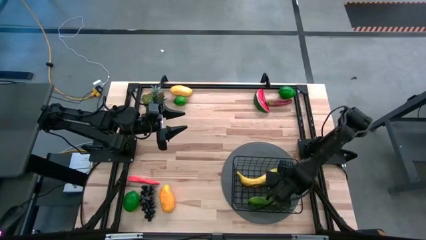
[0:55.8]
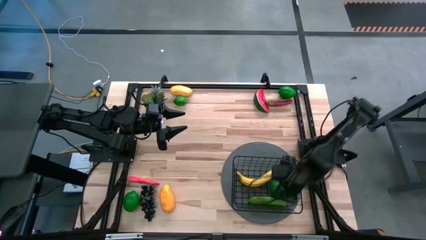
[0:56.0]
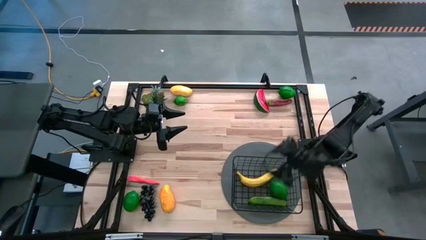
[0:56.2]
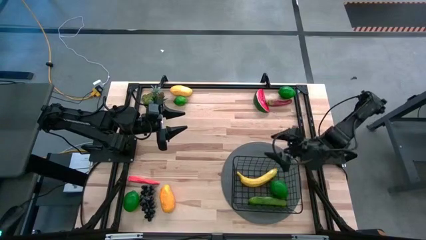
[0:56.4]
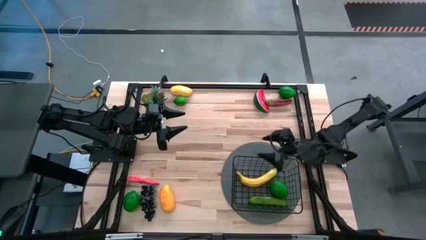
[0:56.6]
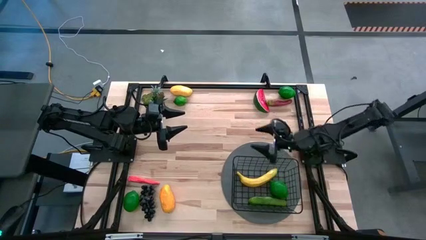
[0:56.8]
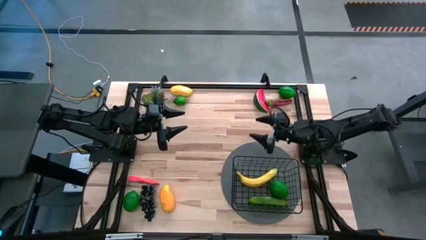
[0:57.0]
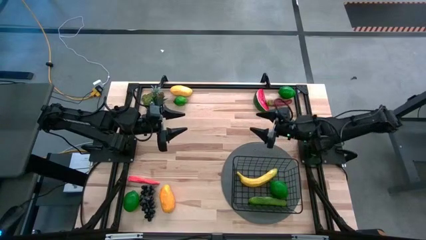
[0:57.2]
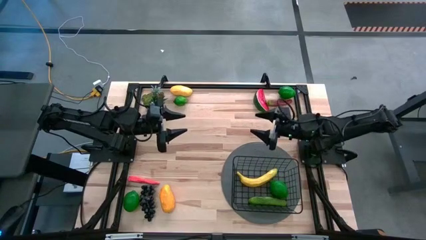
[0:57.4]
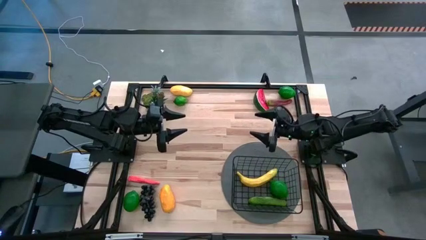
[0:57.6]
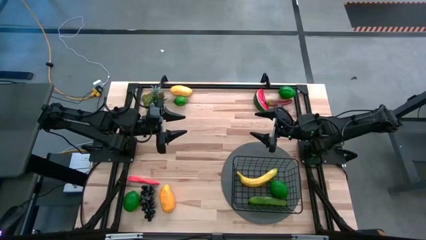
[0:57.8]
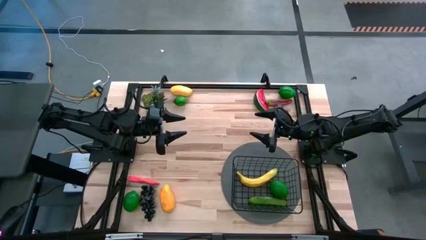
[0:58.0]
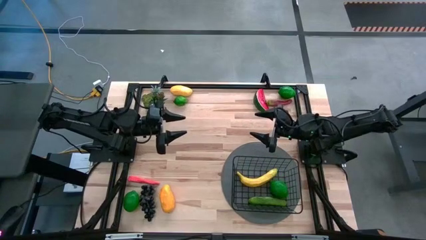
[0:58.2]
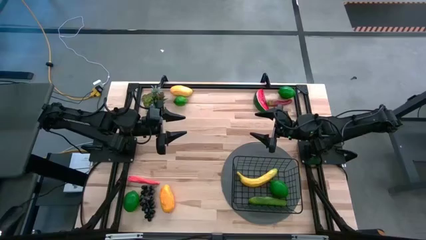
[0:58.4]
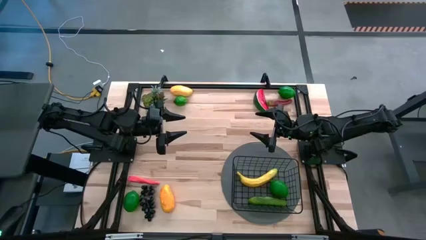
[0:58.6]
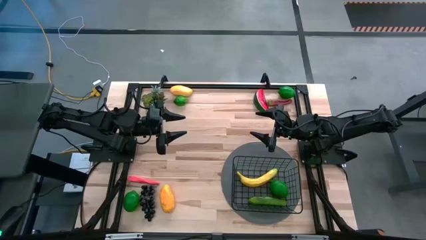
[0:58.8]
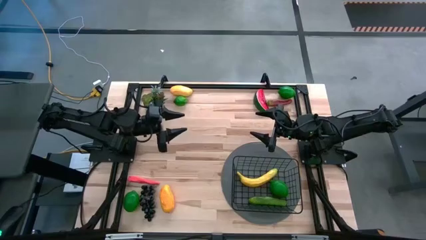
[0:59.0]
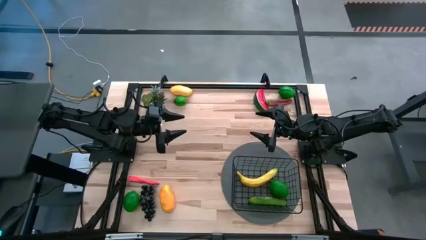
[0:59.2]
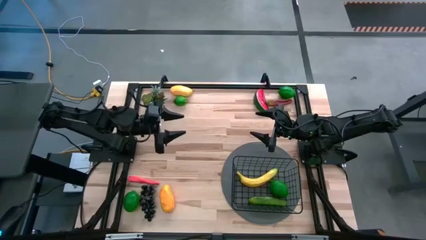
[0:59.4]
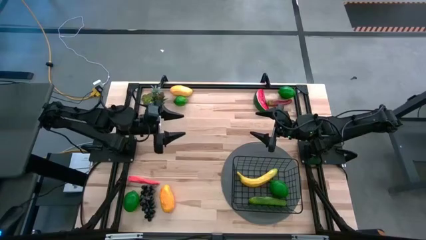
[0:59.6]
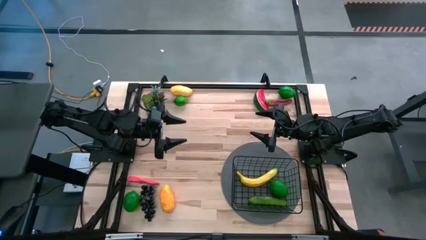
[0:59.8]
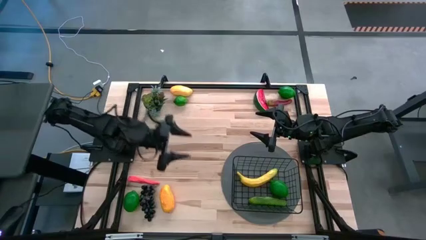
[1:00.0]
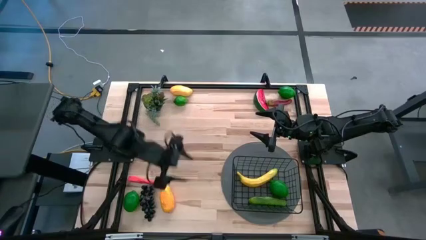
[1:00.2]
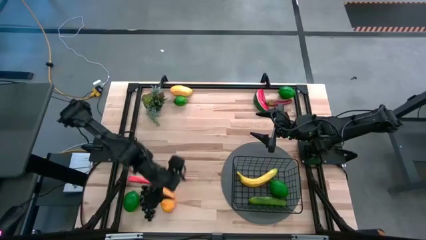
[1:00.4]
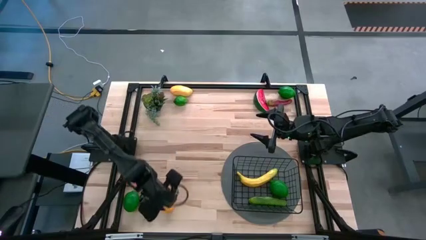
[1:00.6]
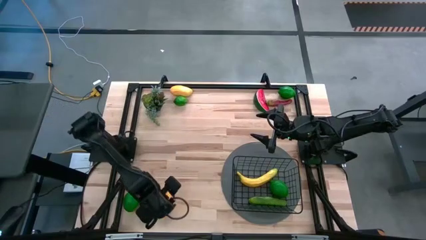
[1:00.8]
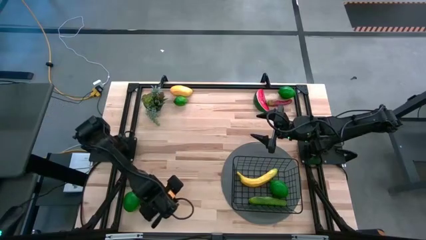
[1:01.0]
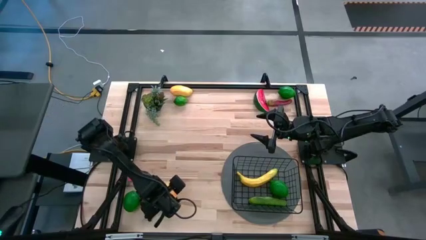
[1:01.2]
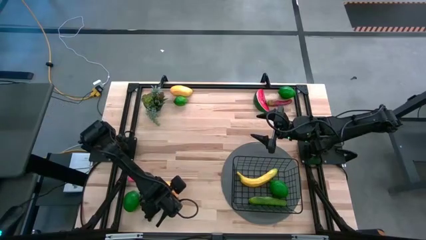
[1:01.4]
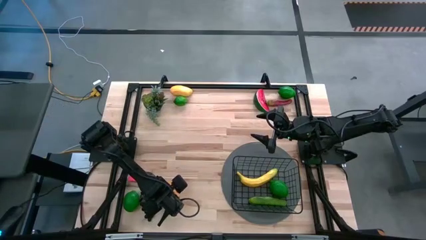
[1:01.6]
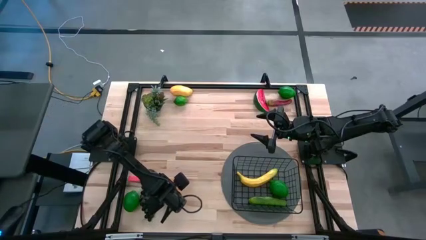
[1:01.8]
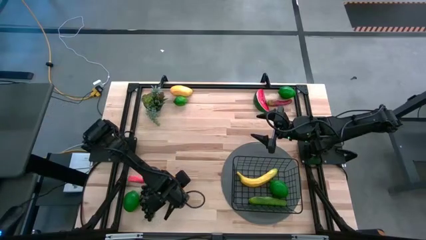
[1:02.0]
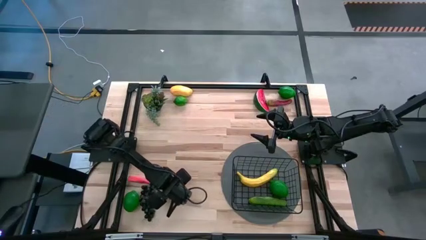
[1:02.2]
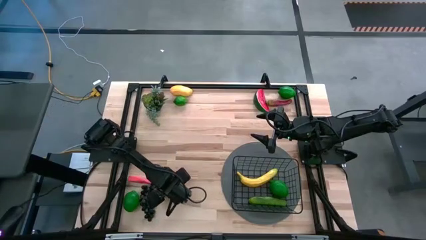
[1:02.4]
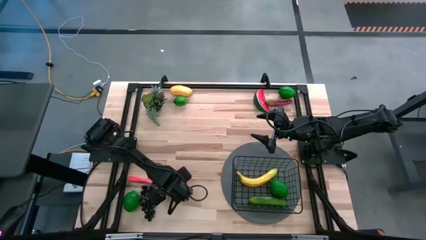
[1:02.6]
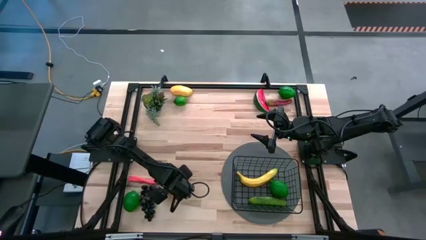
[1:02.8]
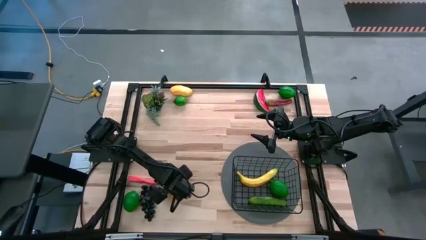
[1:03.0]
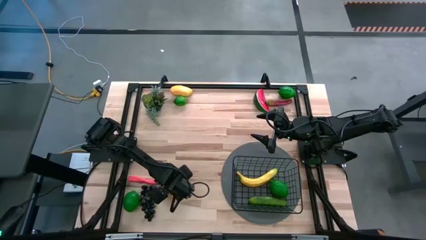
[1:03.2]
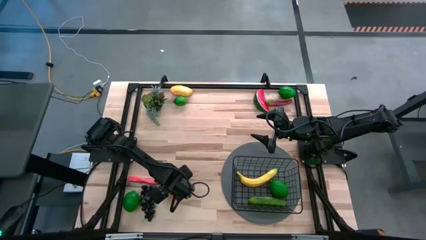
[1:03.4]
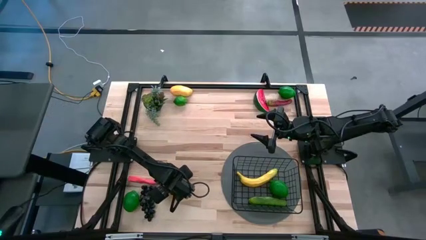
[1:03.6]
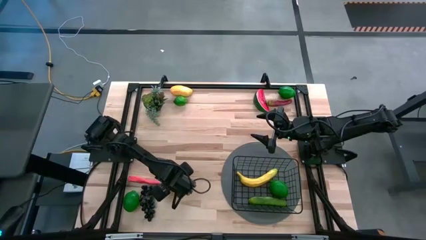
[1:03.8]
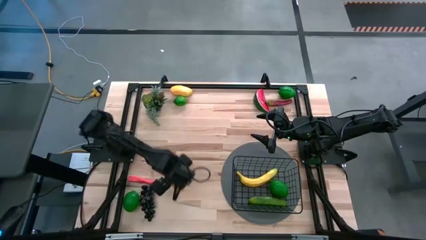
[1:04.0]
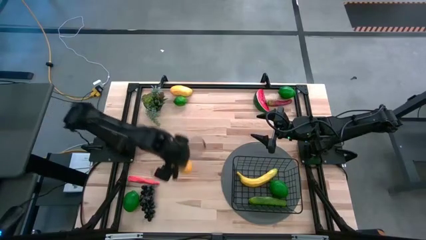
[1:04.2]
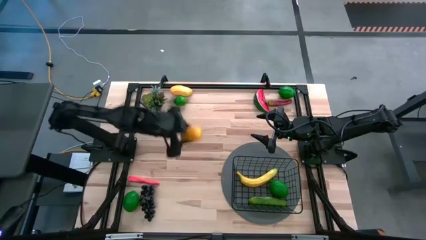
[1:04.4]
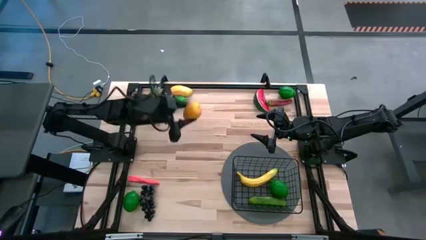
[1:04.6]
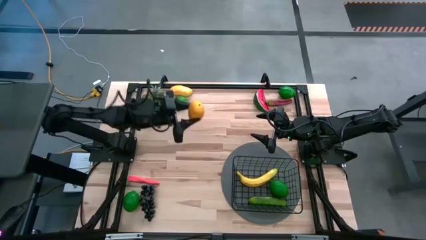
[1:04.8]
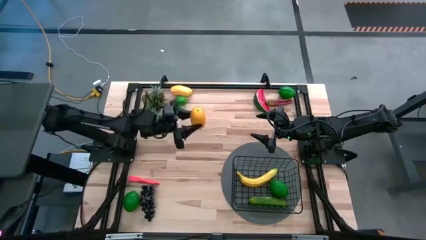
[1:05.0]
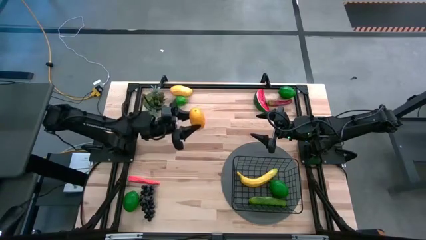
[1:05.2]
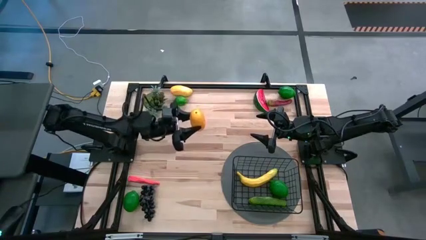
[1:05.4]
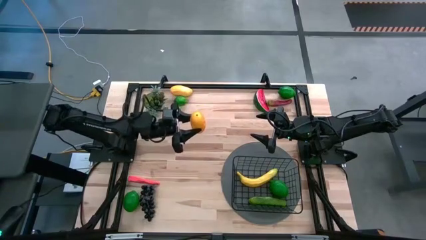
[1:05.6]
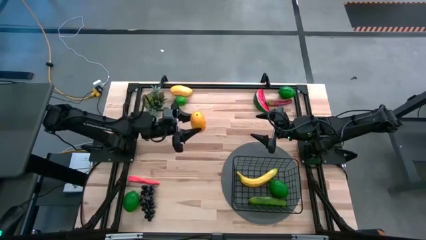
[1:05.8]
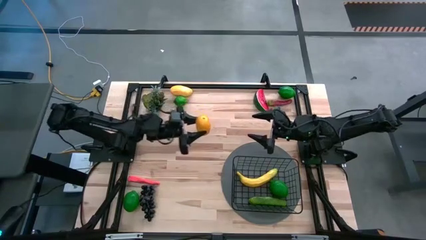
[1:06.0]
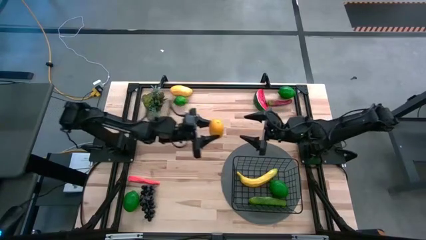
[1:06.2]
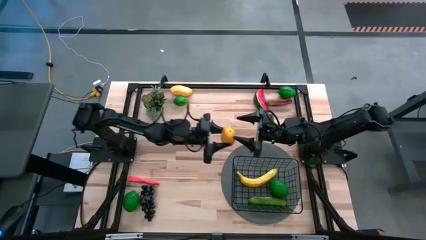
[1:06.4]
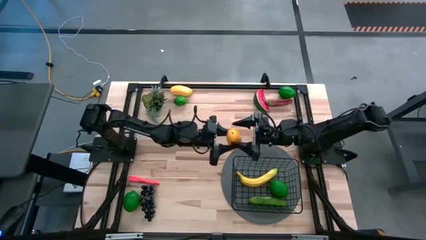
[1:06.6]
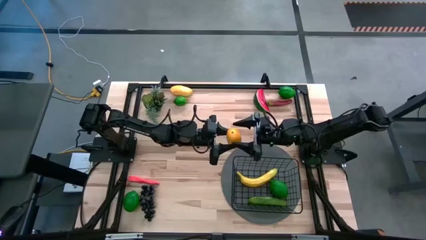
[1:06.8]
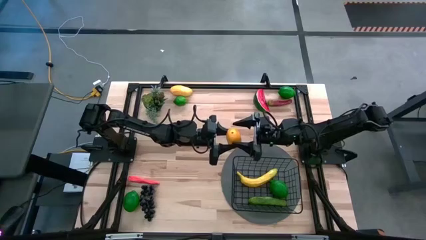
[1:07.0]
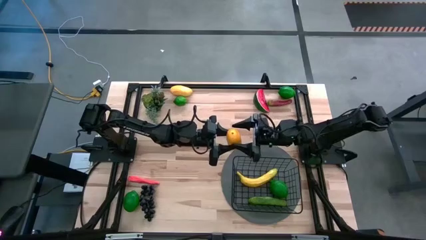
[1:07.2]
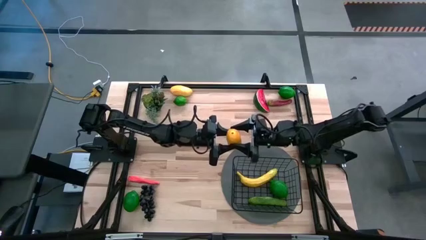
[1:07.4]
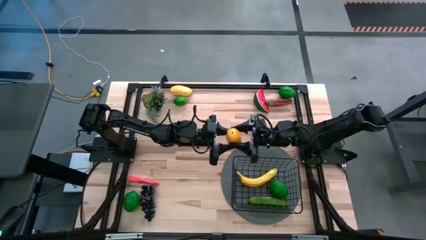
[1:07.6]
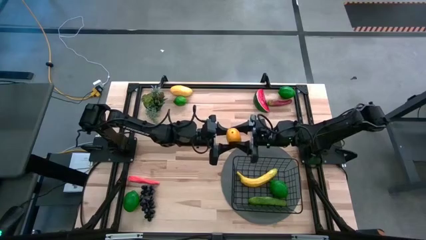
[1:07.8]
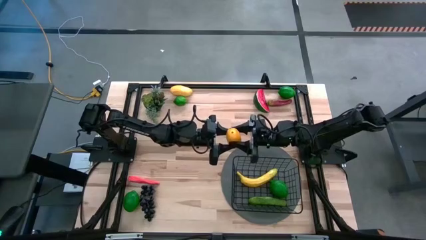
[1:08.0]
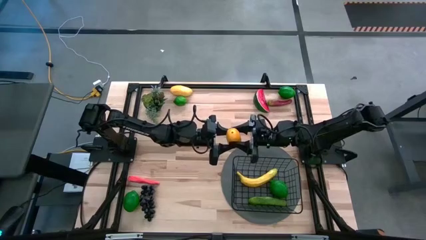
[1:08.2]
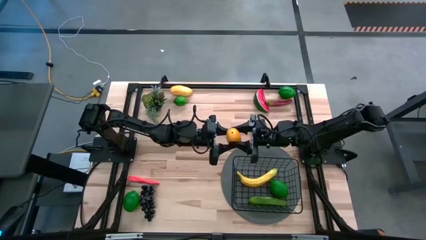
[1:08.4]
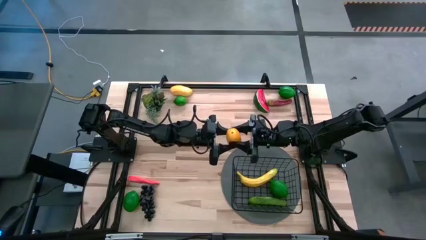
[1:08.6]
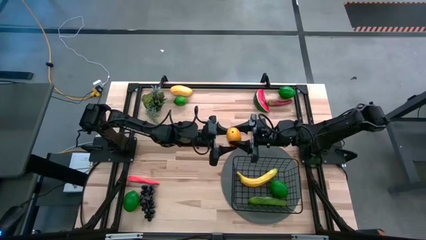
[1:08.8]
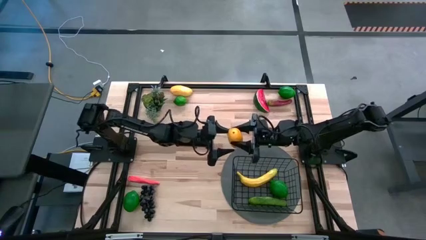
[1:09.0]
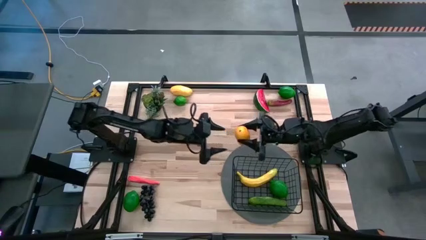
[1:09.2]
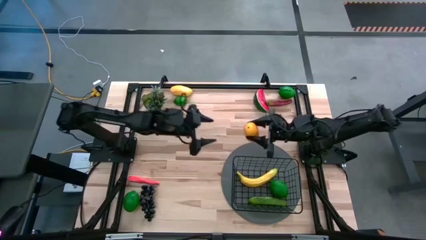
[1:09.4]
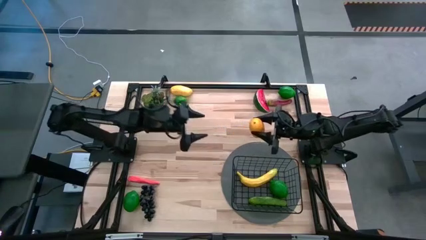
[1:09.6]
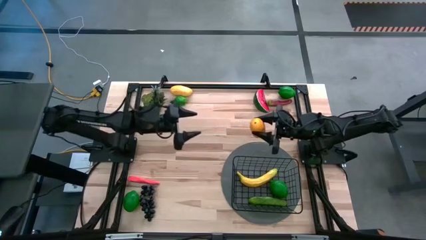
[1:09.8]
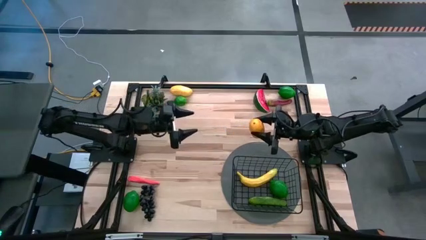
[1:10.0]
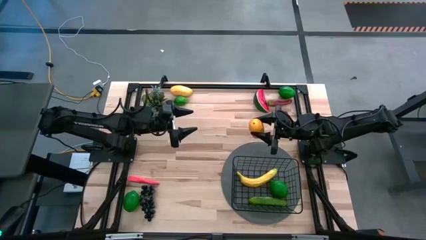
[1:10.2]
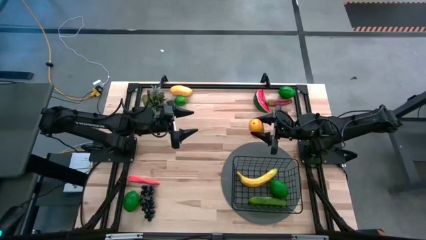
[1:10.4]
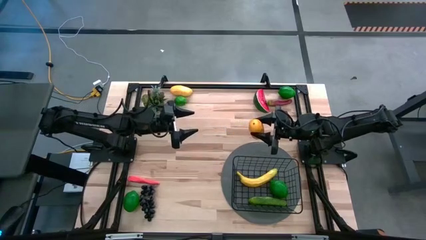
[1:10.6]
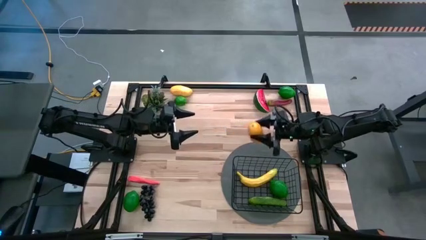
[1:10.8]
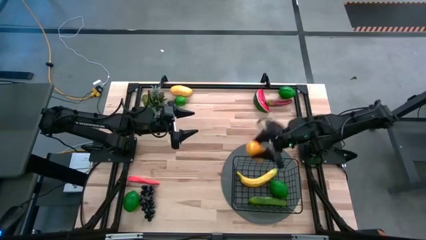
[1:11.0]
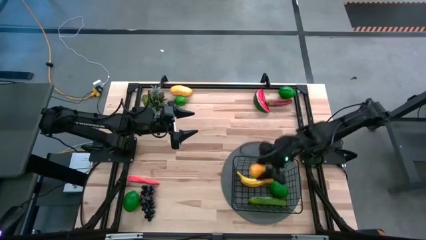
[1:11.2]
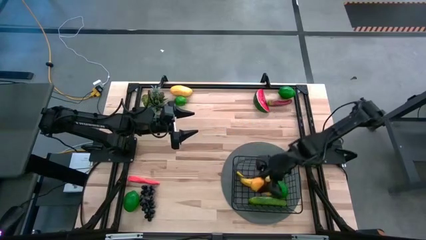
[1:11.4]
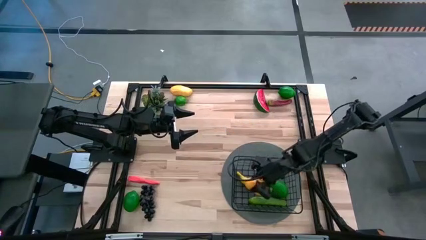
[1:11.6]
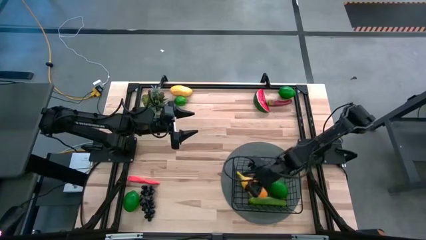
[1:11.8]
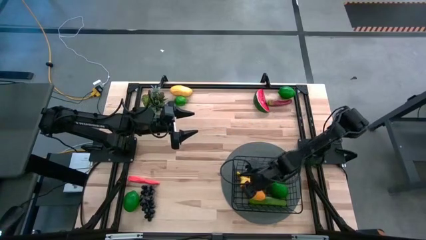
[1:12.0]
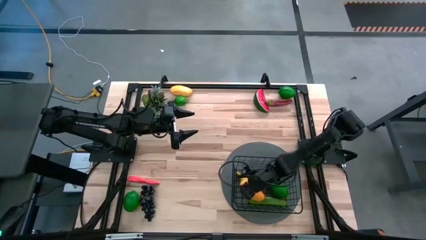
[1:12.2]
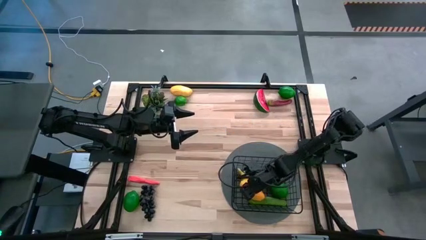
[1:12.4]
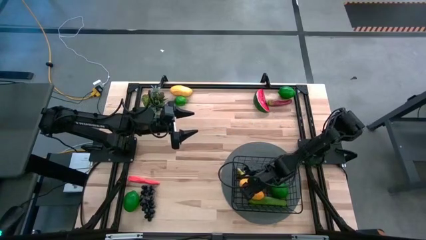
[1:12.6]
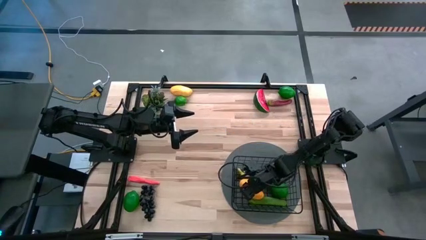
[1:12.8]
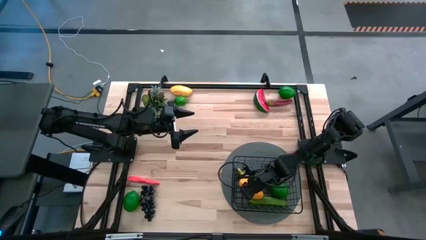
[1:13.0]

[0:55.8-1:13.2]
Task: Build produce basket
Put the yellow mango into the black basket
